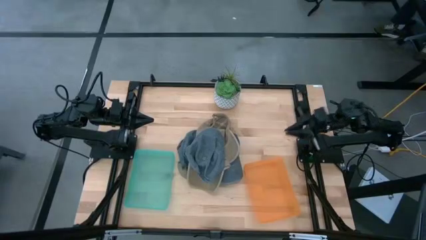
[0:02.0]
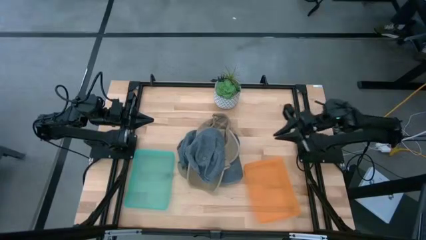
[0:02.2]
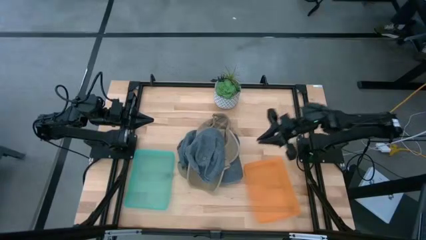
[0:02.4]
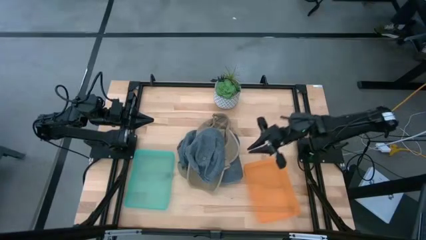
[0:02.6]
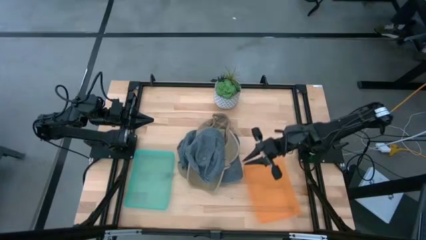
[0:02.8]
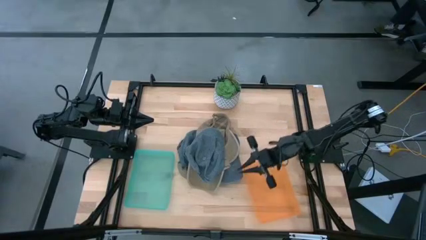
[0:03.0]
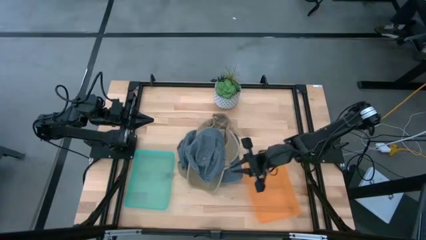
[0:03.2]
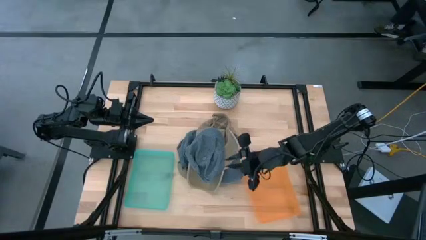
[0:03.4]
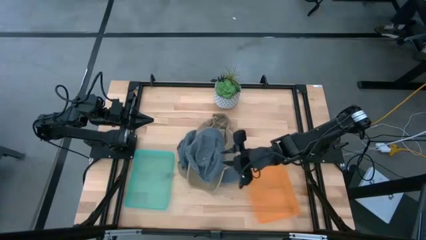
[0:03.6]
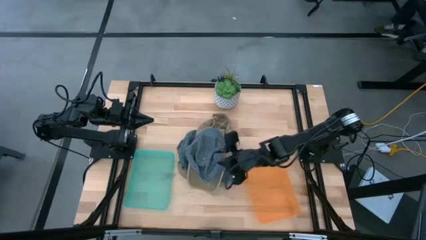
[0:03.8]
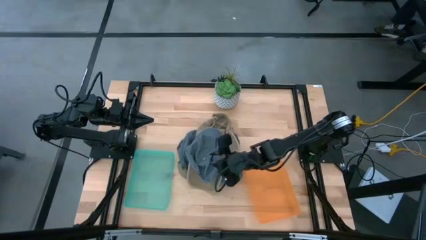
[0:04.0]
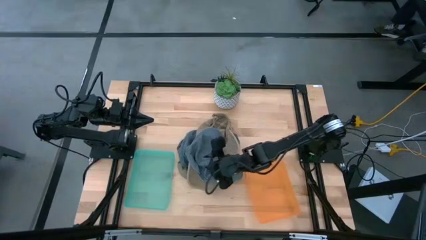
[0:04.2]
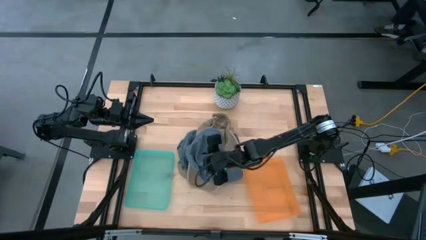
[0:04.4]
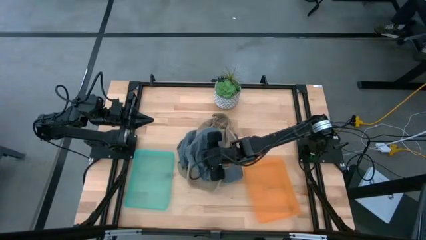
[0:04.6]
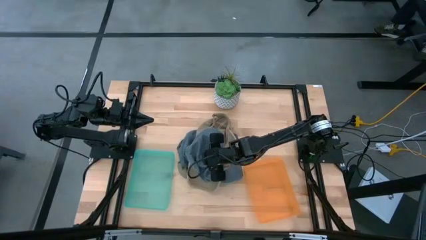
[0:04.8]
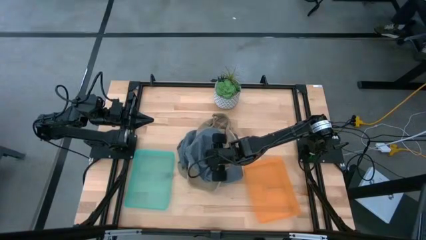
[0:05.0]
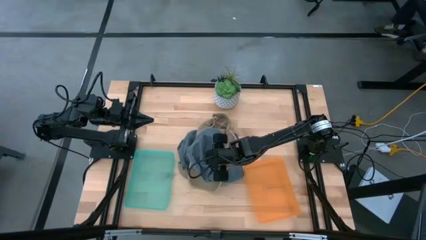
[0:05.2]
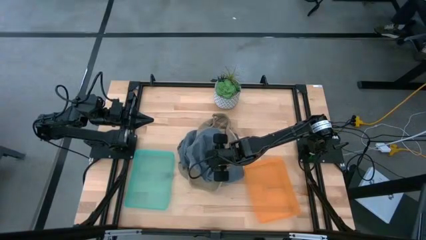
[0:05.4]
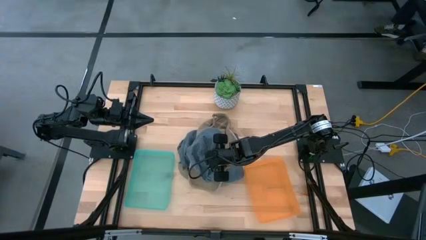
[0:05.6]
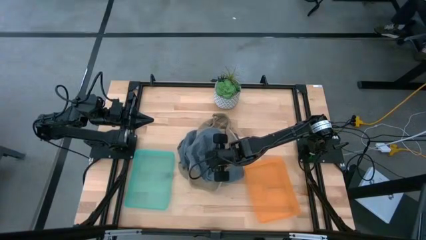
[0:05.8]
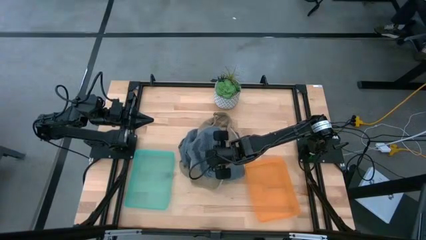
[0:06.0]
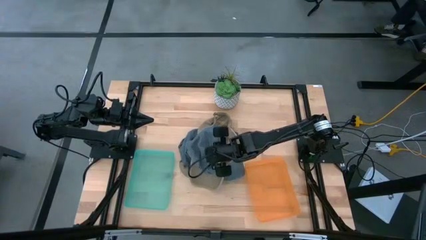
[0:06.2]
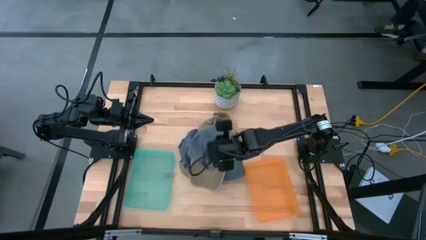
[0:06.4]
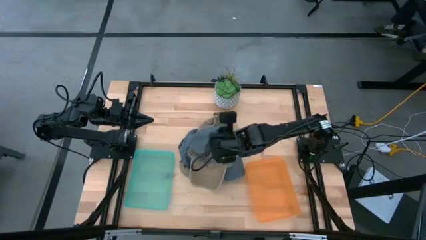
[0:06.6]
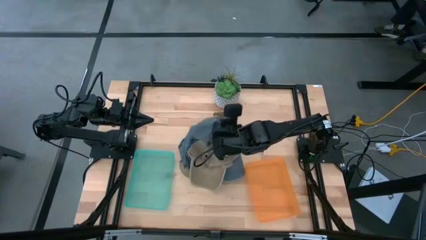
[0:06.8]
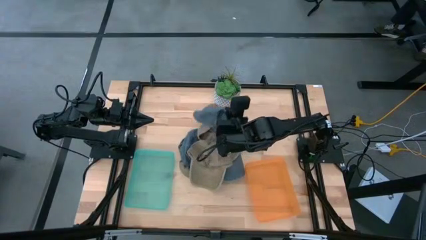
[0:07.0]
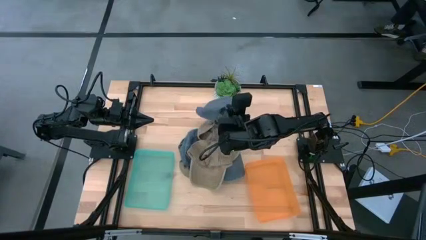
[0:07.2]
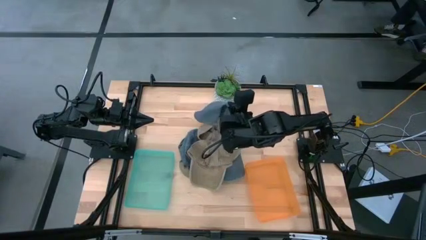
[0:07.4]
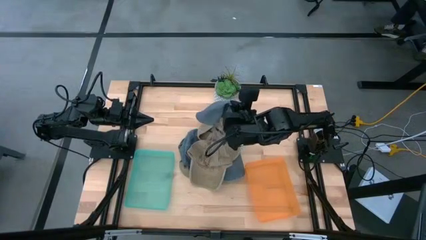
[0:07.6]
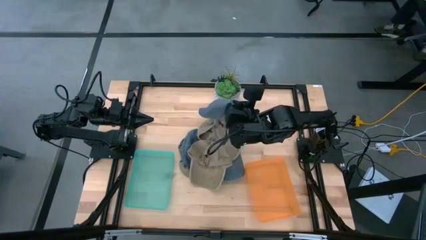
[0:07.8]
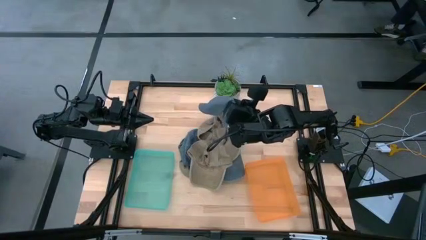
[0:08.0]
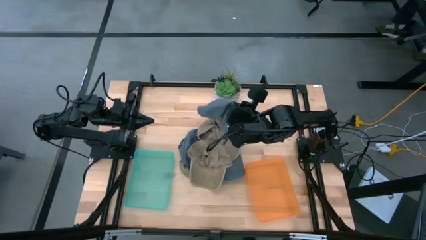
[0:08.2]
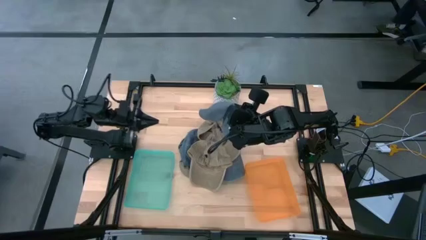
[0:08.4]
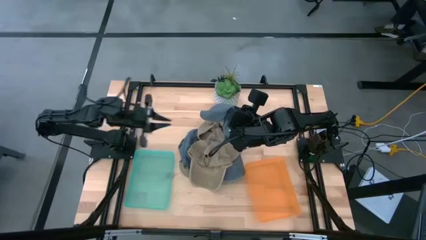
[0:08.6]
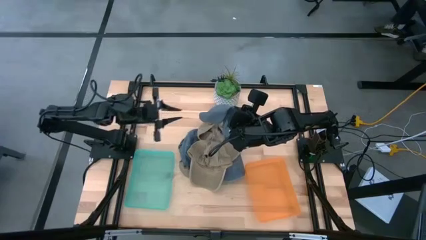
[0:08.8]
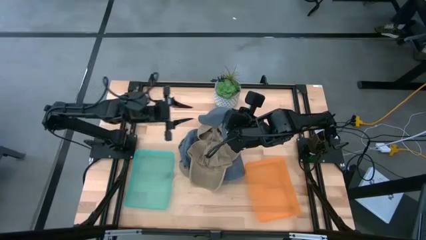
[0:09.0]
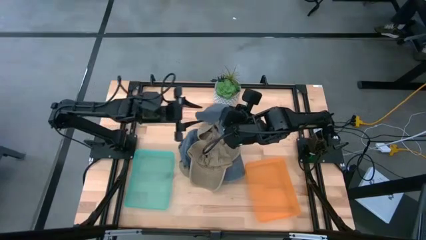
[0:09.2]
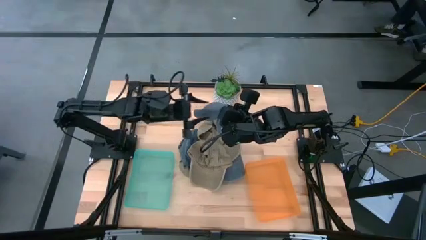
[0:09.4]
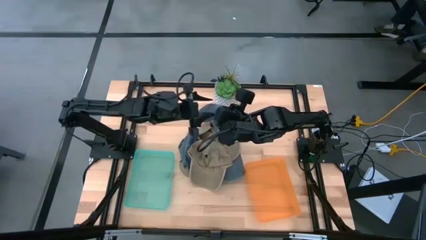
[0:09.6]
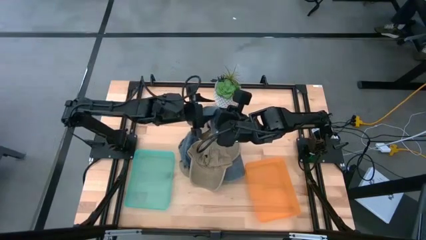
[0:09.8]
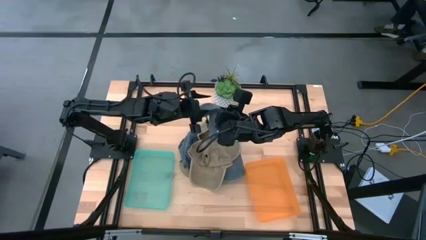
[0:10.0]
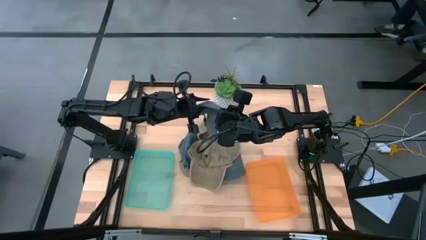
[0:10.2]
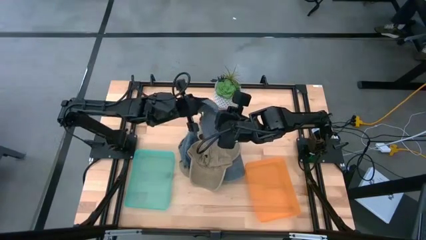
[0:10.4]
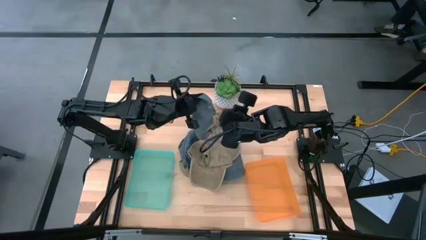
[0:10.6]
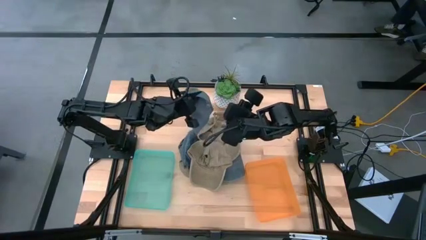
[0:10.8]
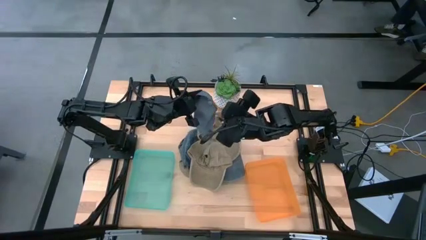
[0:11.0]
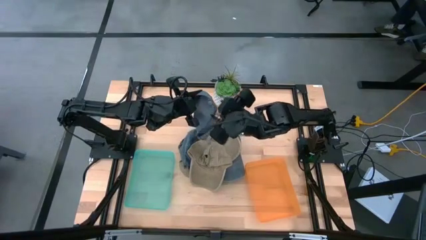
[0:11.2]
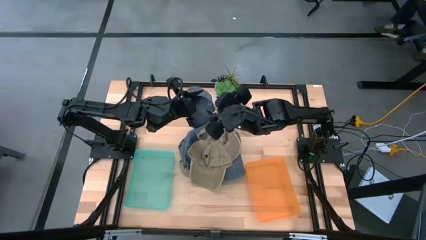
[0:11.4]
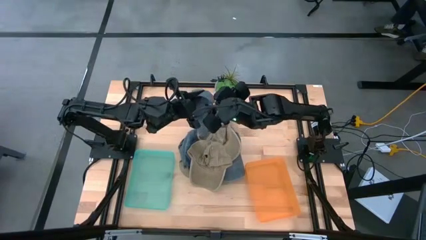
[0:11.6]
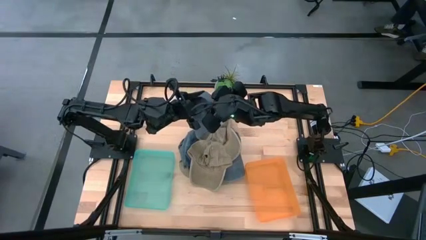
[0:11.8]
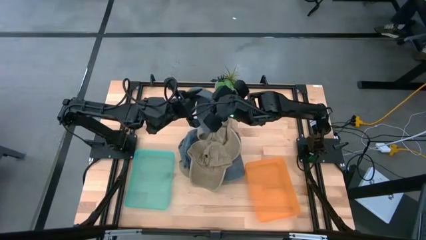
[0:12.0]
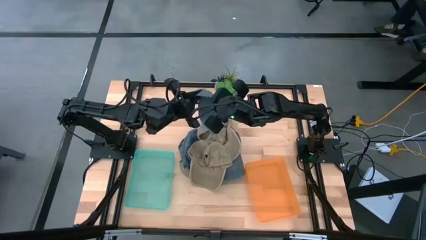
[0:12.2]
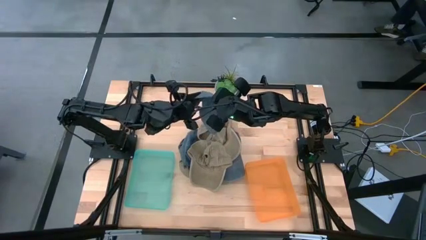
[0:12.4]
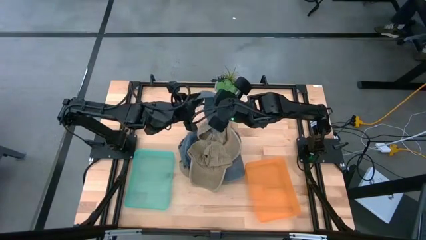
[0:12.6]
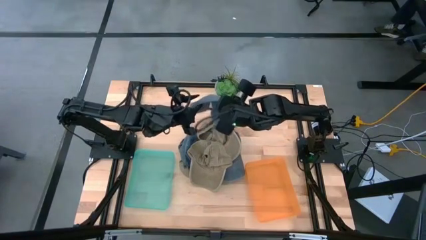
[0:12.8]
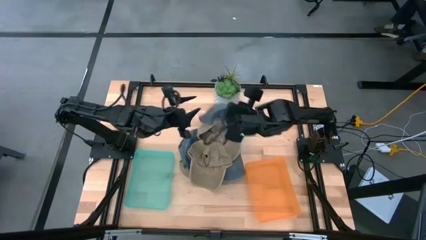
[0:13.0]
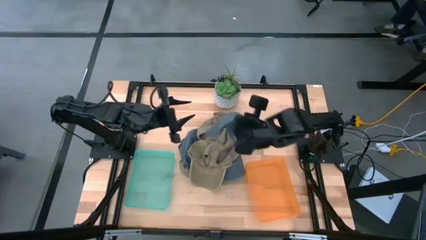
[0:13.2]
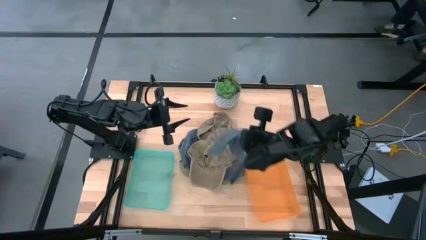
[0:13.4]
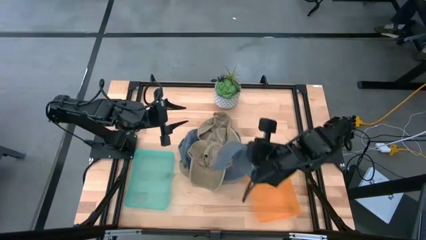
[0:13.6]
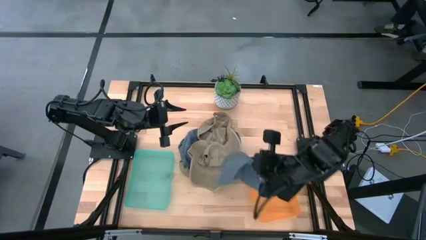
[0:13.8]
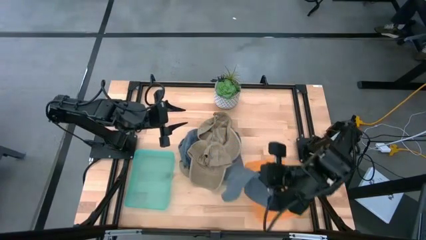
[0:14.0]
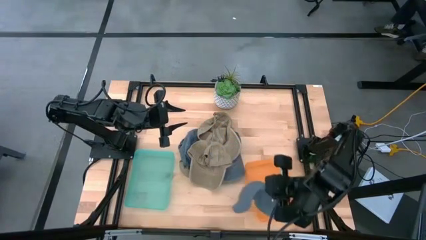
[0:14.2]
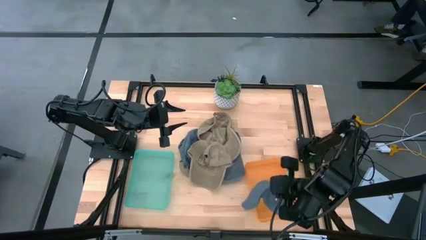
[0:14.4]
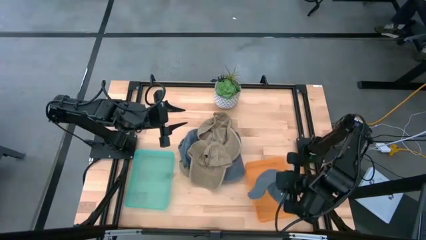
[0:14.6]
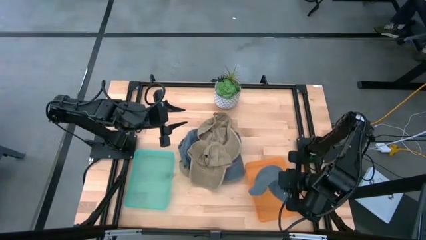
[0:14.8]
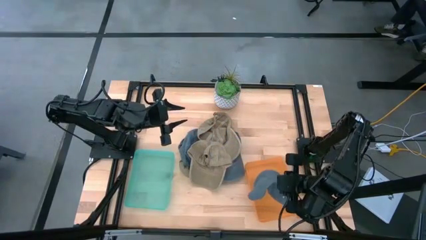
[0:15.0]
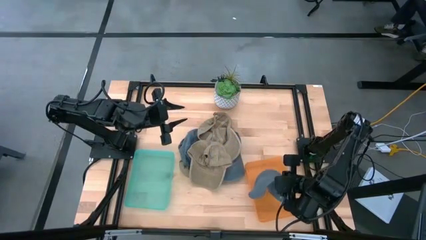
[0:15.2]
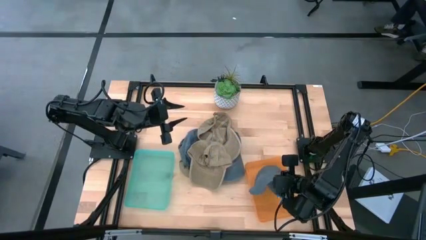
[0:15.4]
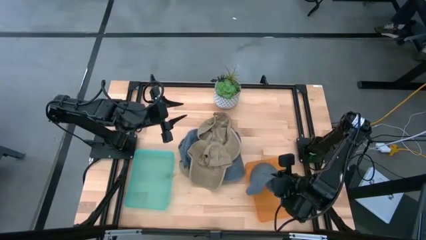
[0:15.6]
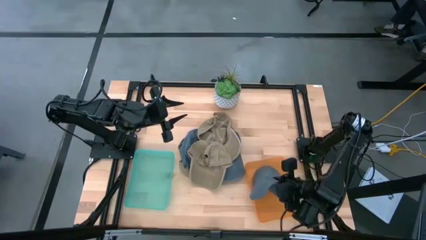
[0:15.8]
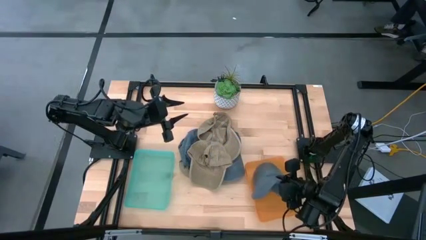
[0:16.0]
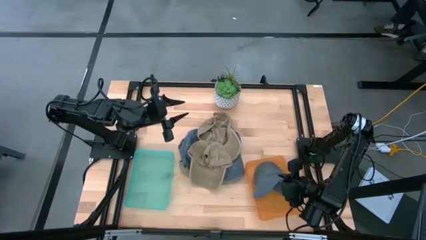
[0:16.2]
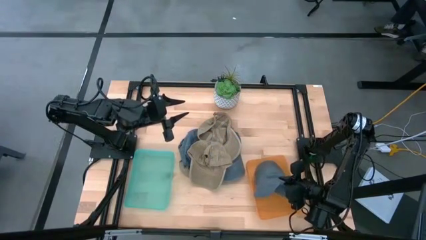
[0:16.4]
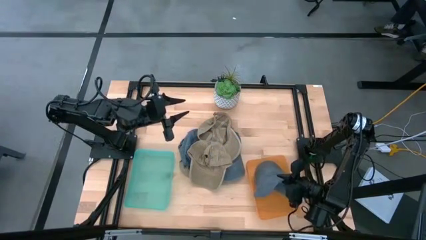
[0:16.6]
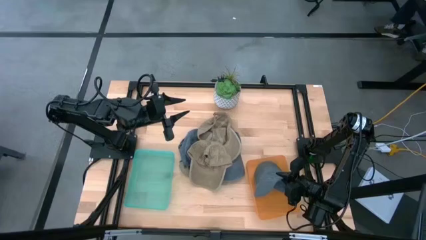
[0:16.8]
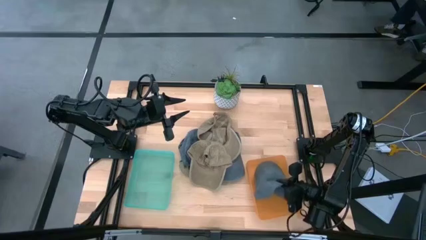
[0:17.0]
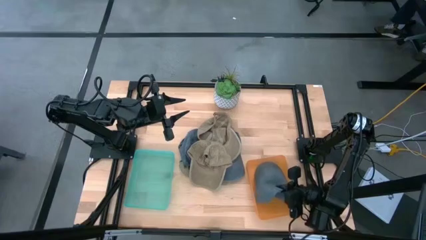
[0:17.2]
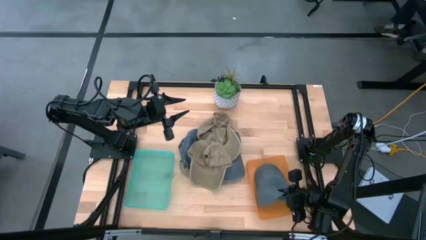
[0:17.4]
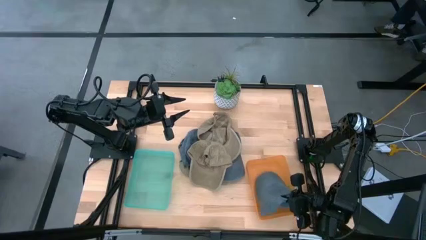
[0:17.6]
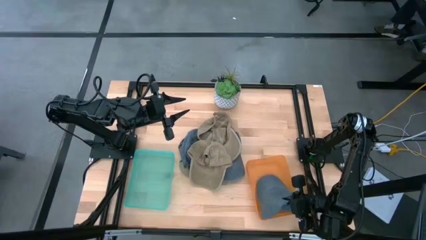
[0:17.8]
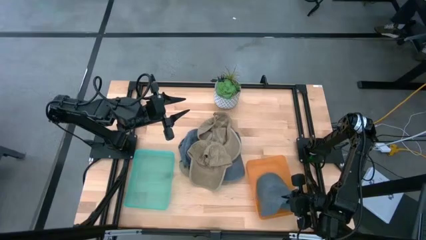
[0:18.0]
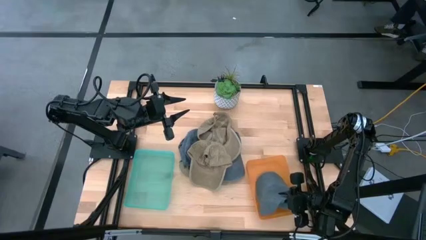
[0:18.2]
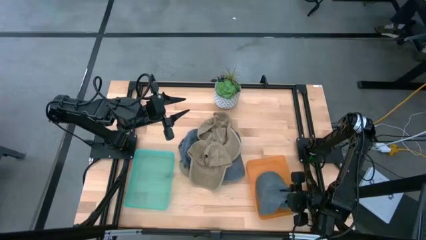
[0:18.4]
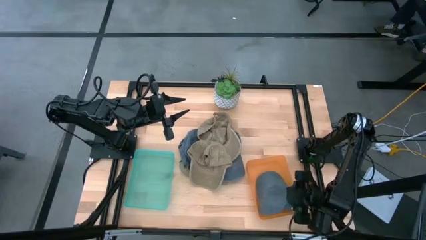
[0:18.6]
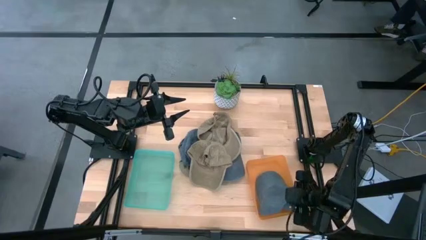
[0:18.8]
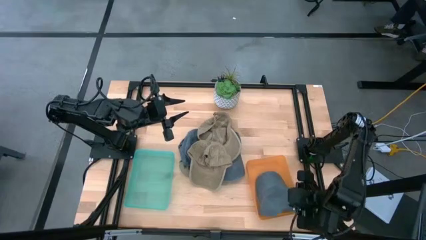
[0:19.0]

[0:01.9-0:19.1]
Task: Pick & Place hat
Put the blue cap into the orange bin
